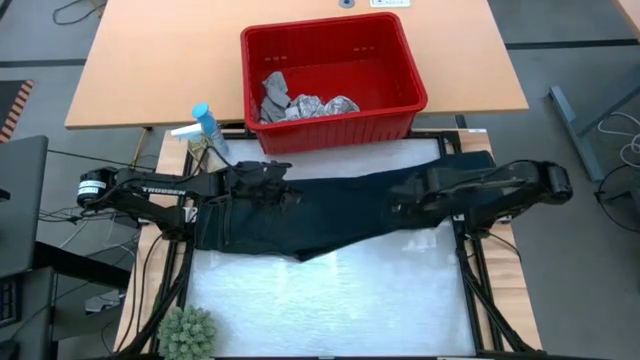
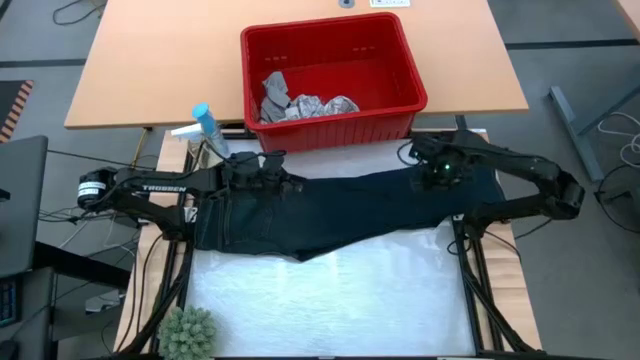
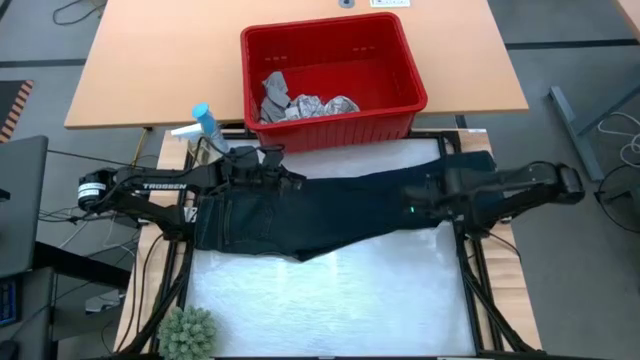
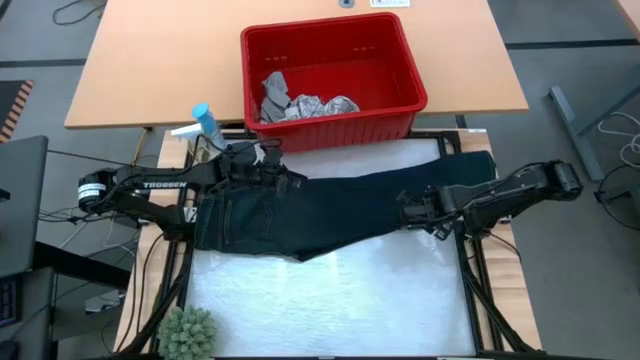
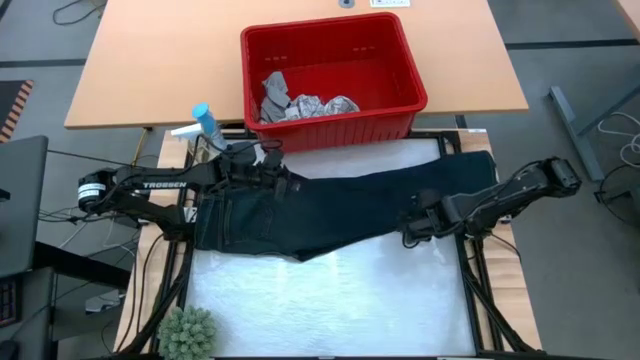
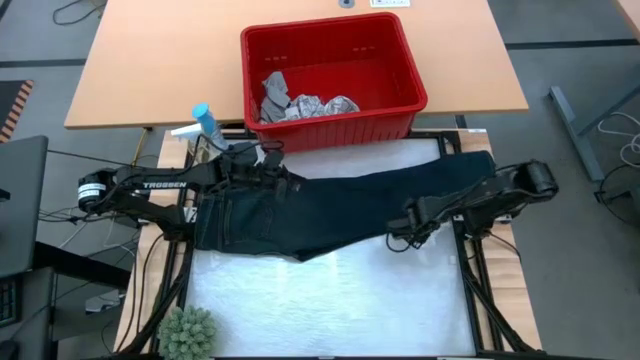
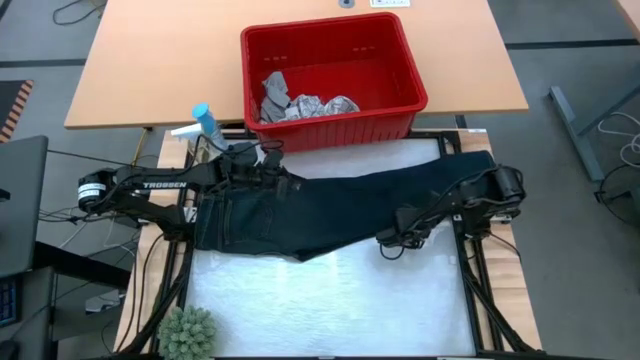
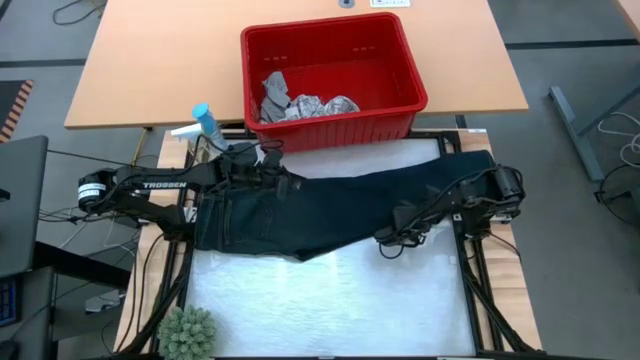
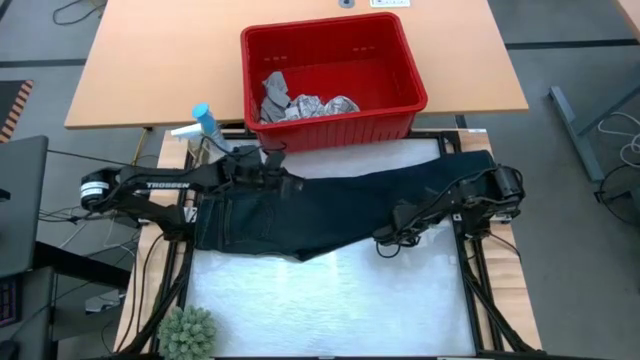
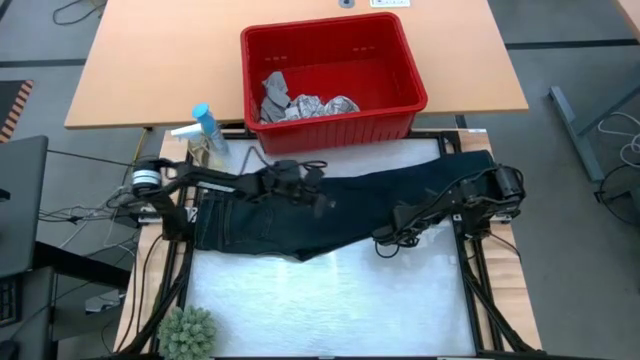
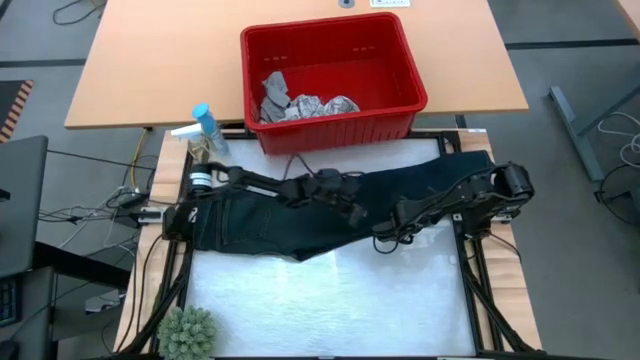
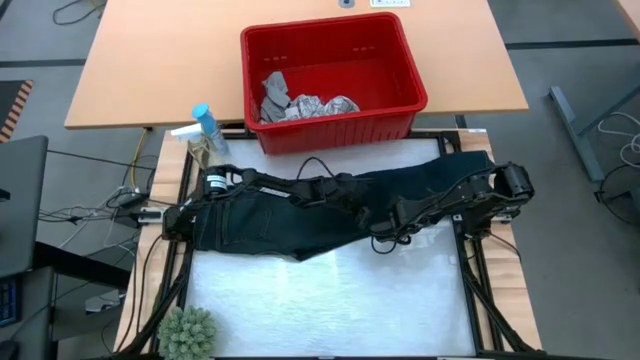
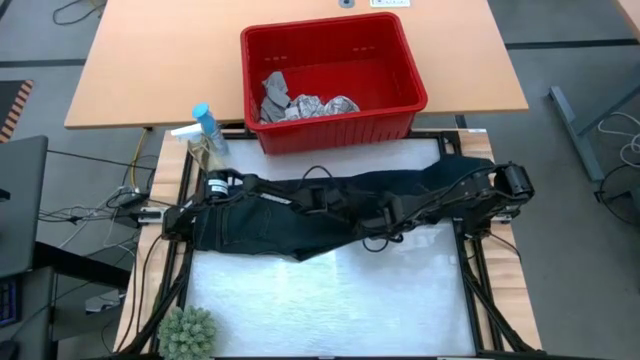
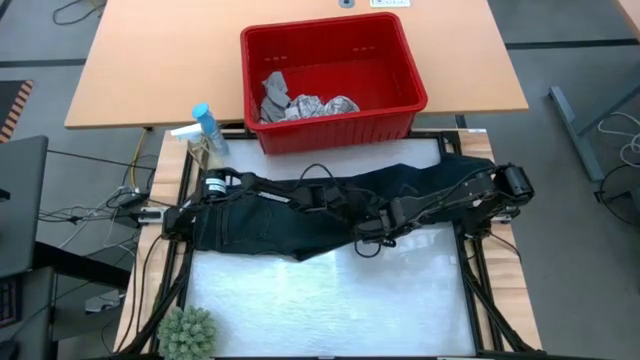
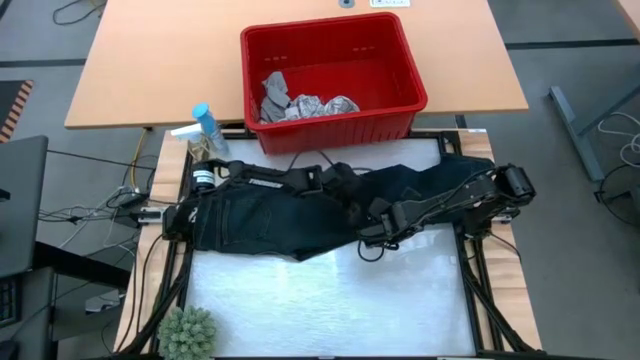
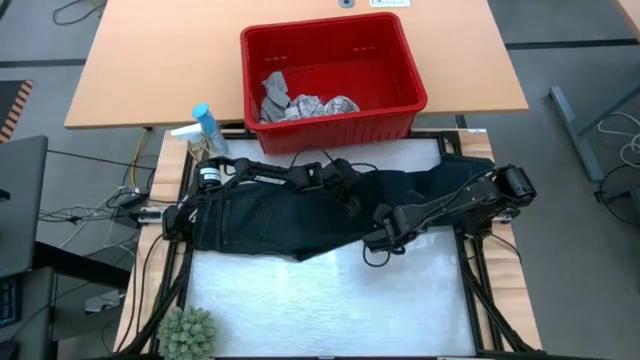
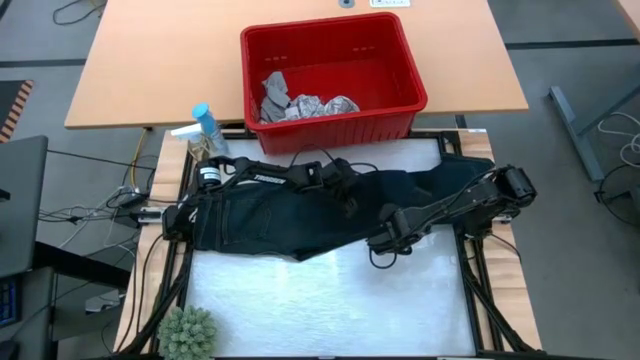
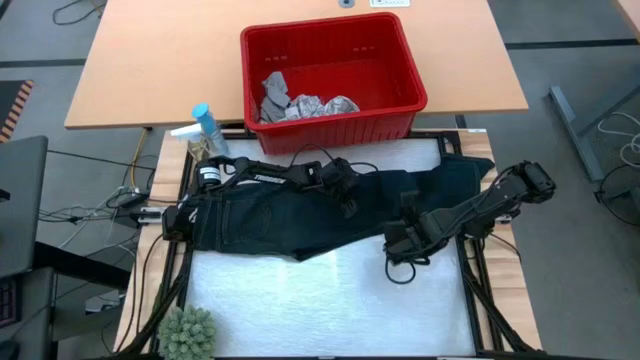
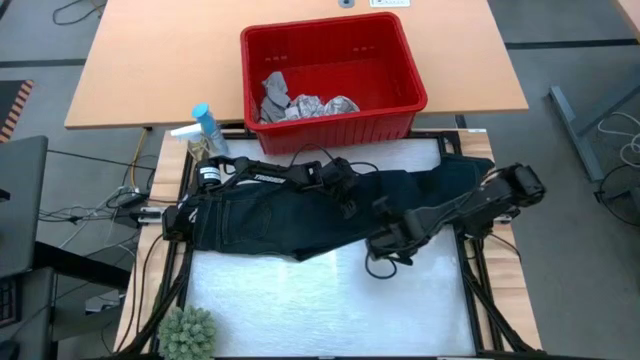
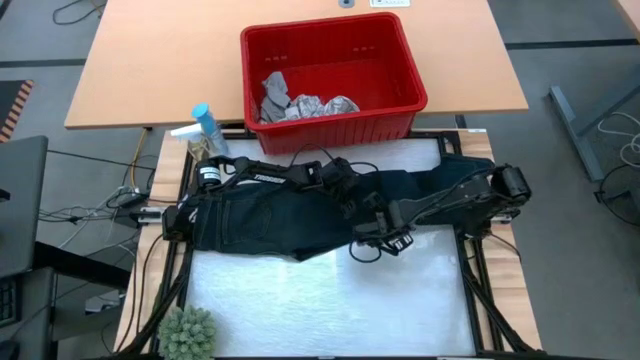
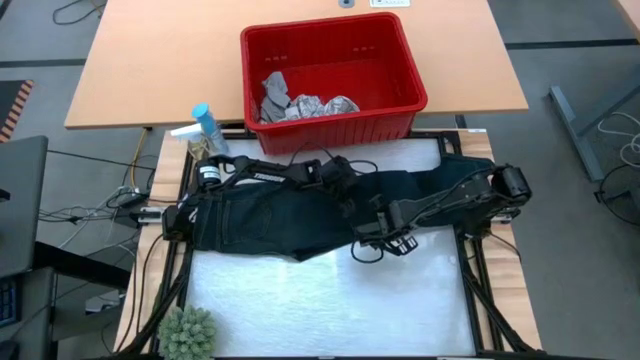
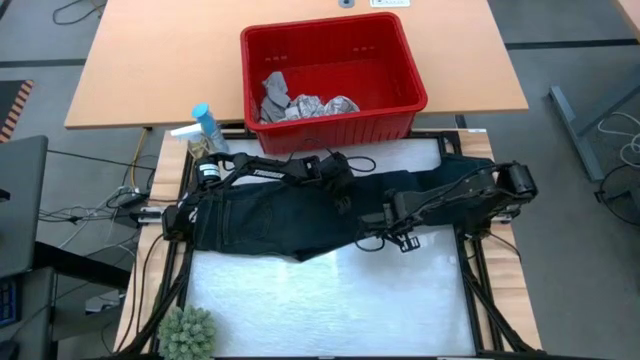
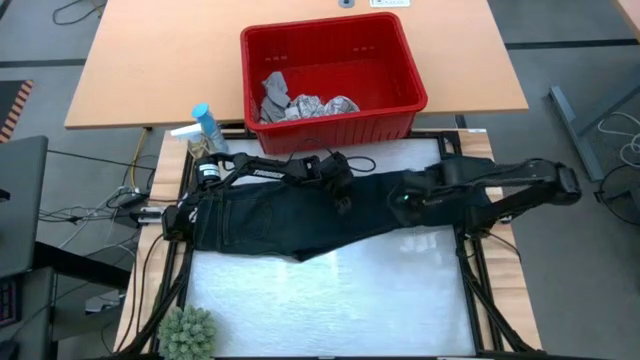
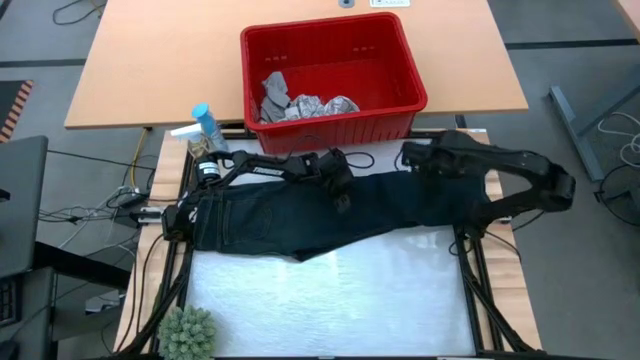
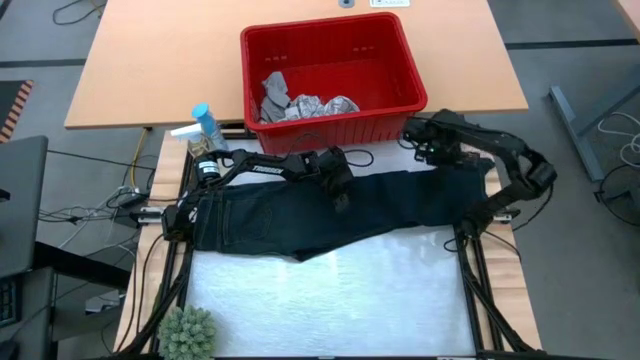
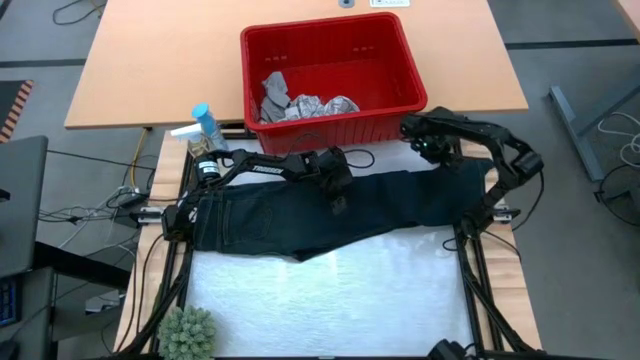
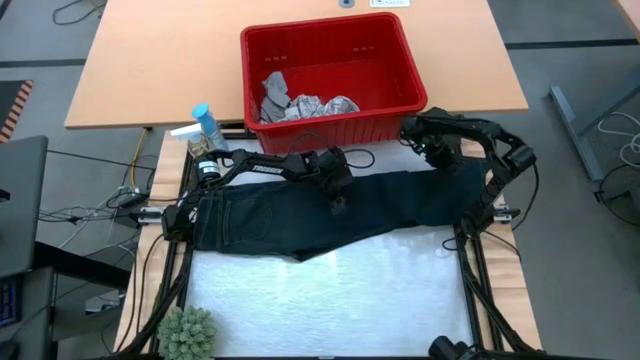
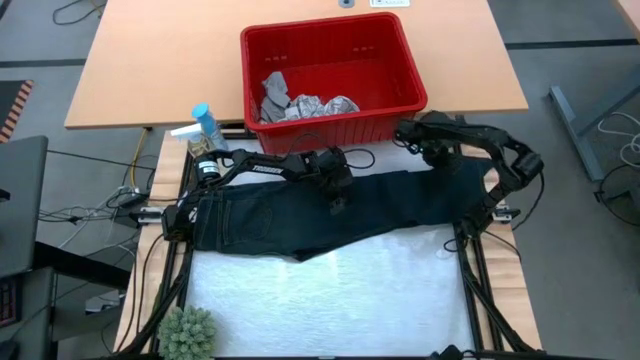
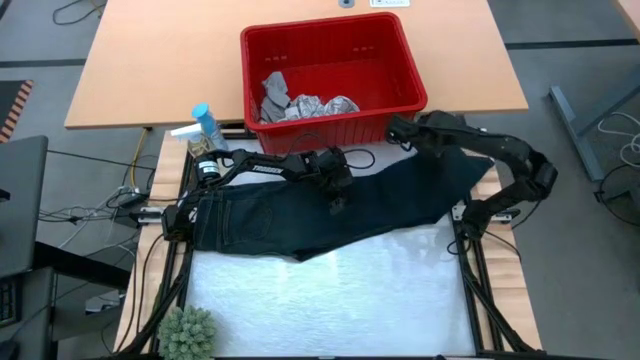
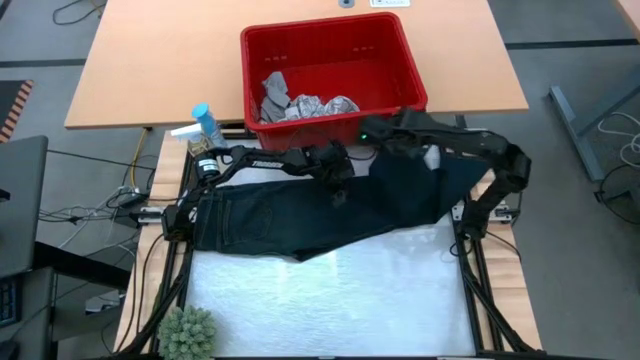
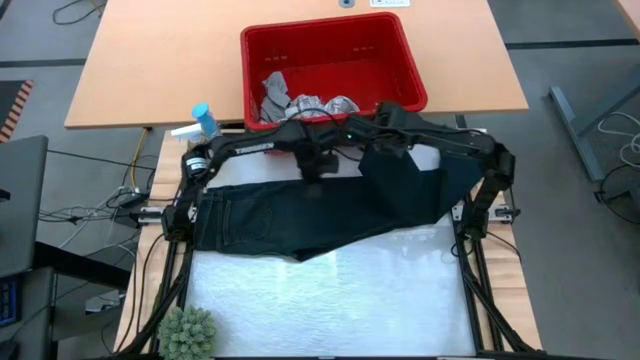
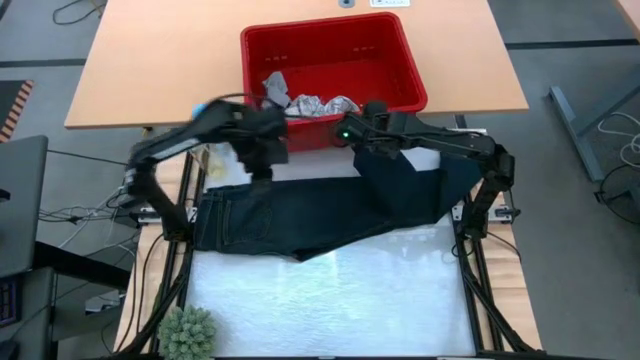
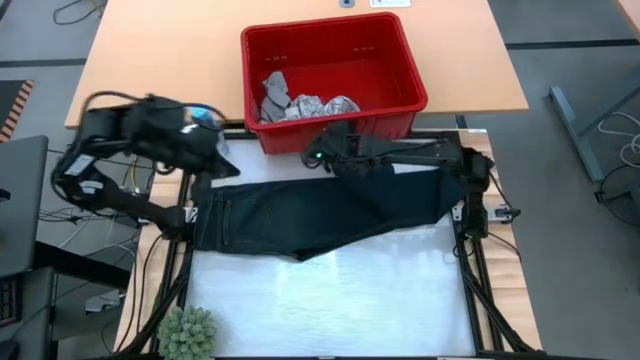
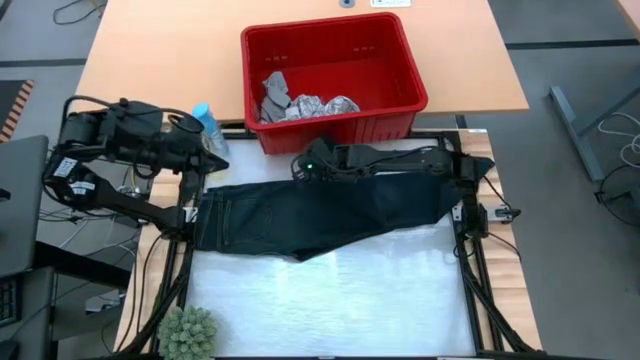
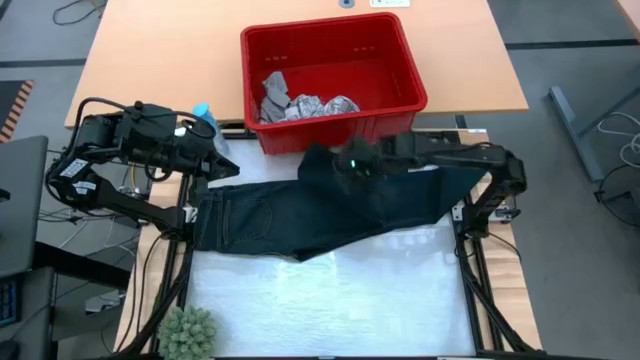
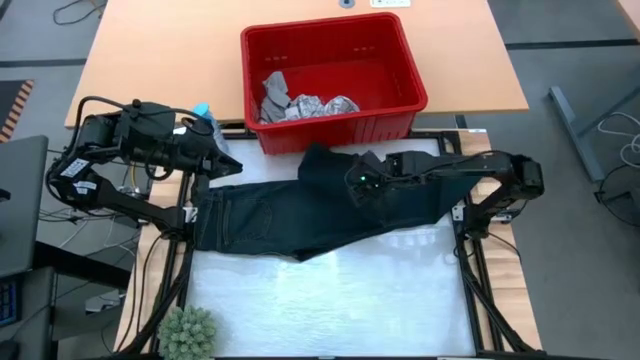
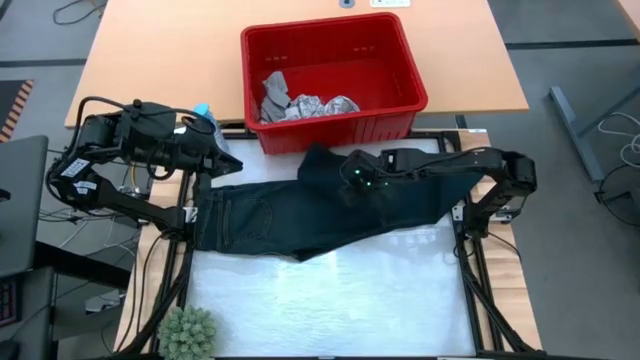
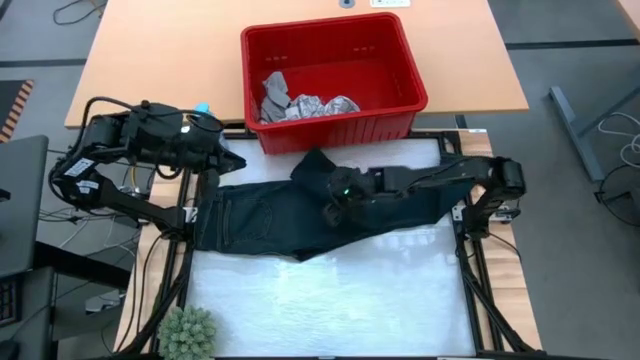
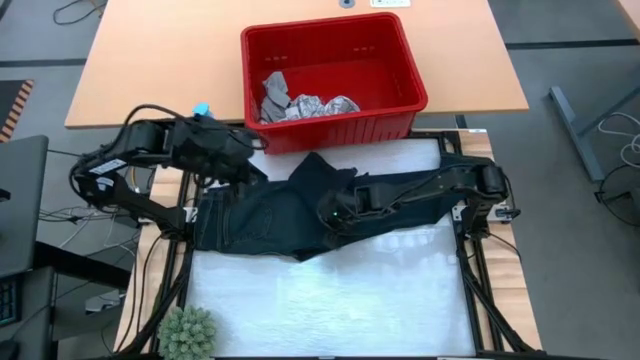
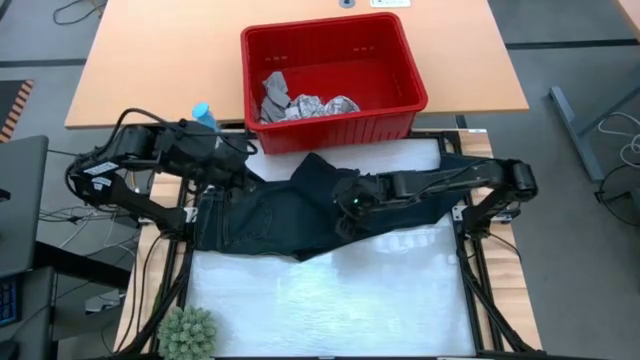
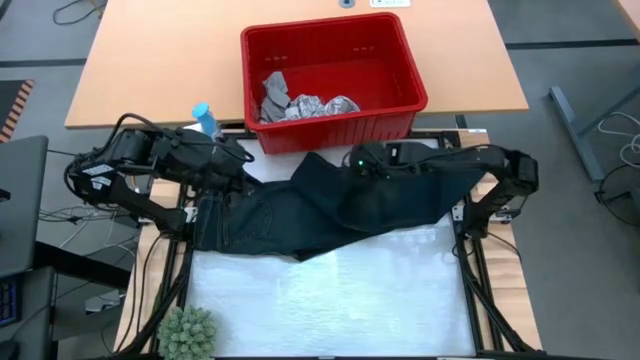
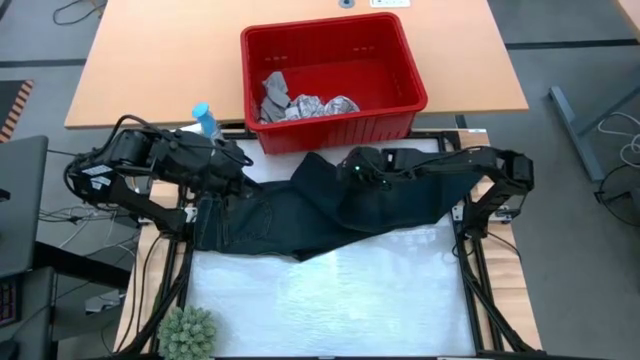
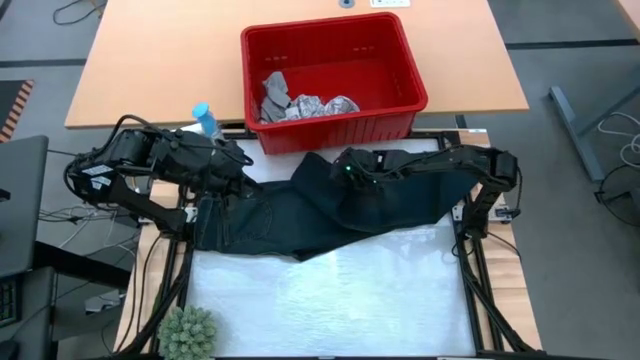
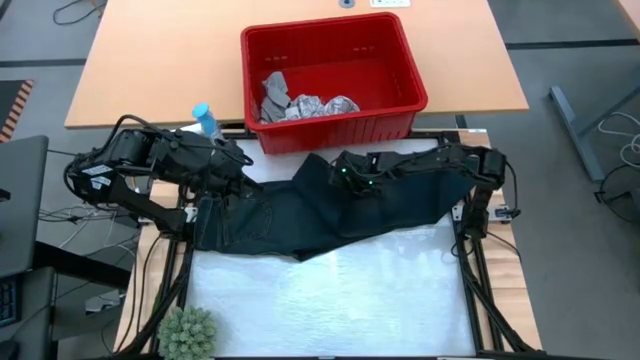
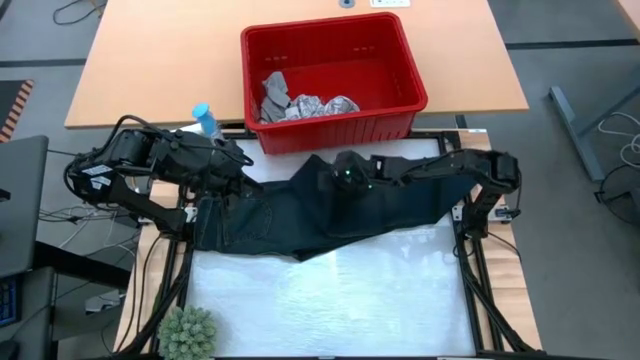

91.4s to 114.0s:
Task: Fold Laundry from Bin
Fold the blue jeans
